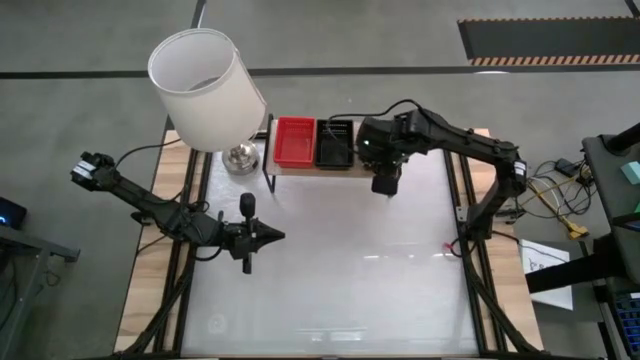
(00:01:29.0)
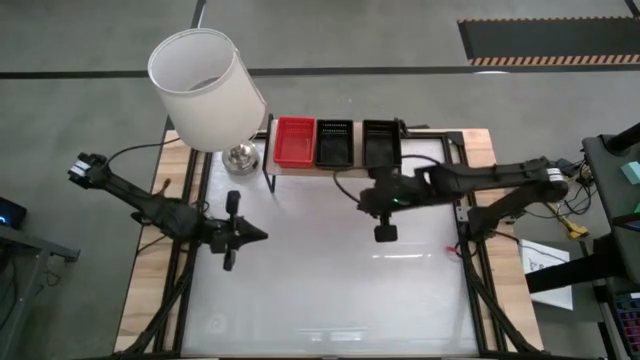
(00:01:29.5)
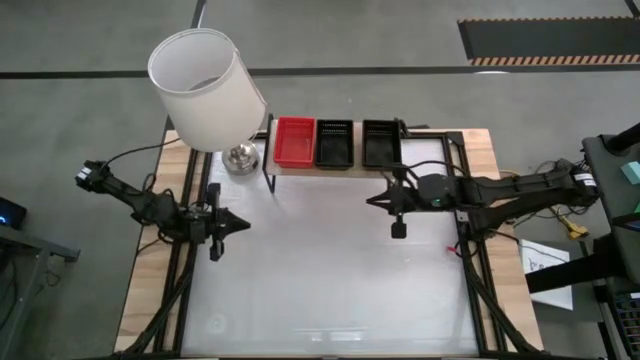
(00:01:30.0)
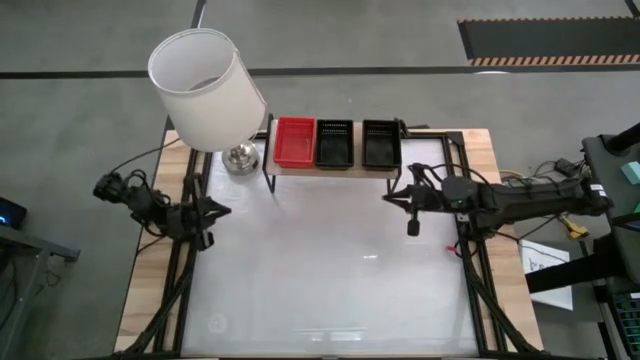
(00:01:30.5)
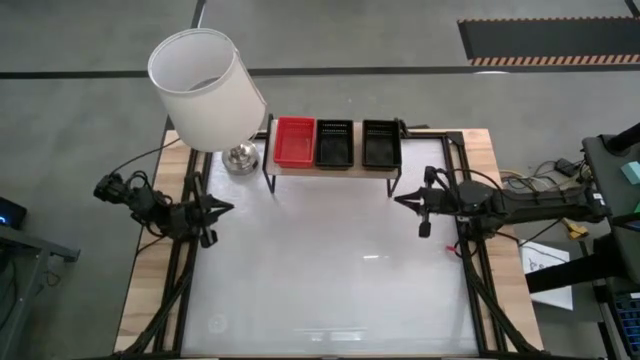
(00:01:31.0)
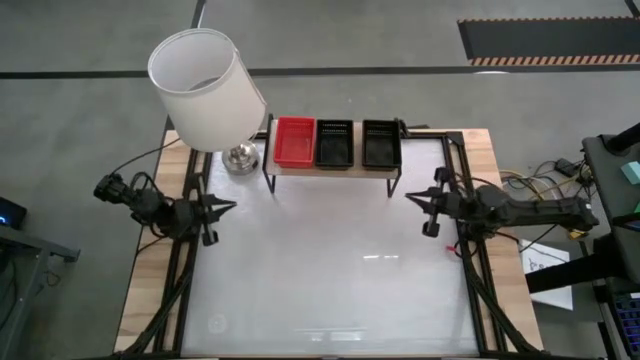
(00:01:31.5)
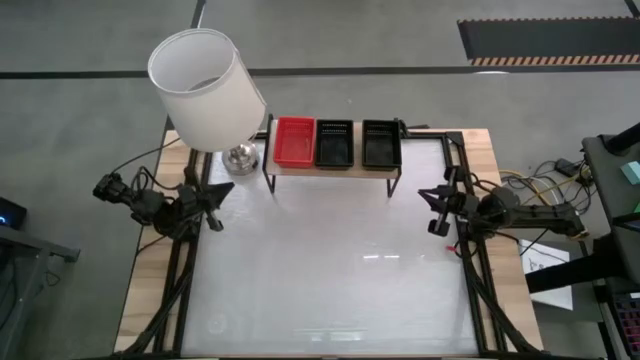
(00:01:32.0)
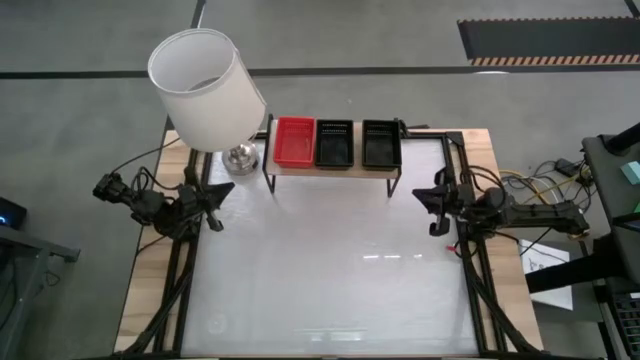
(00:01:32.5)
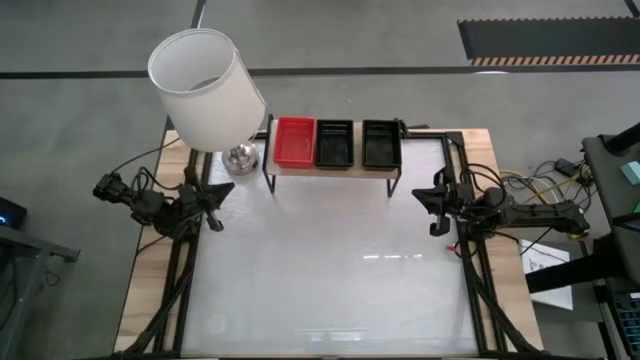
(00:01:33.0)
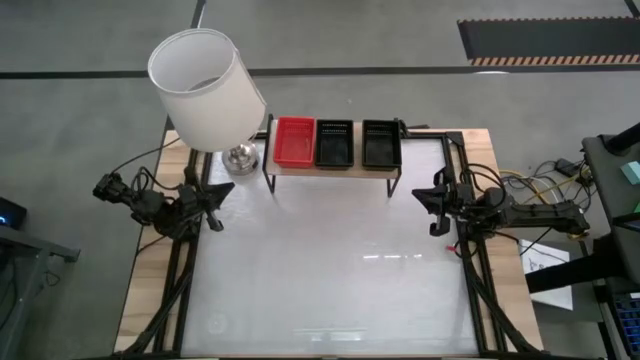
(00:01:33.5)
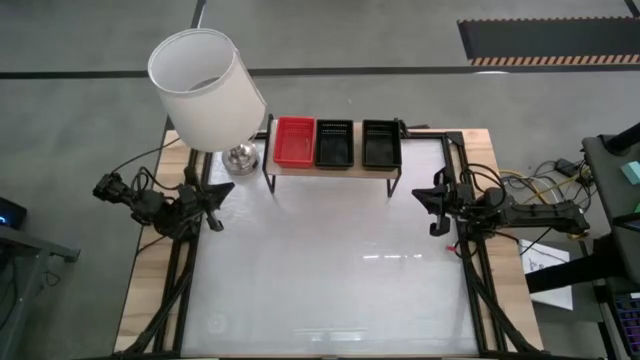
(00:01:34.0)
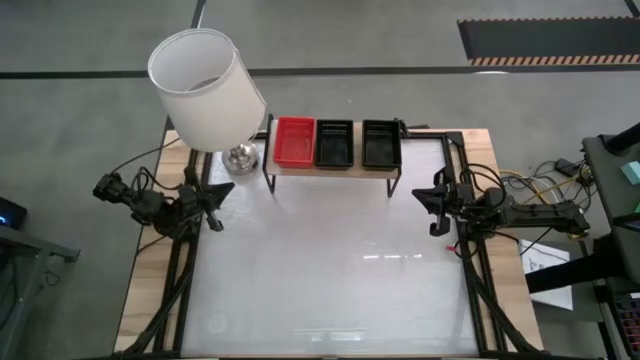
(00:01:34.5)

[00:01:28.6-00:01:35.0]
Return to Home Position
